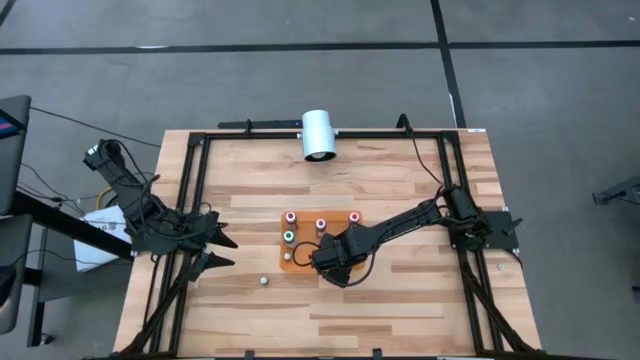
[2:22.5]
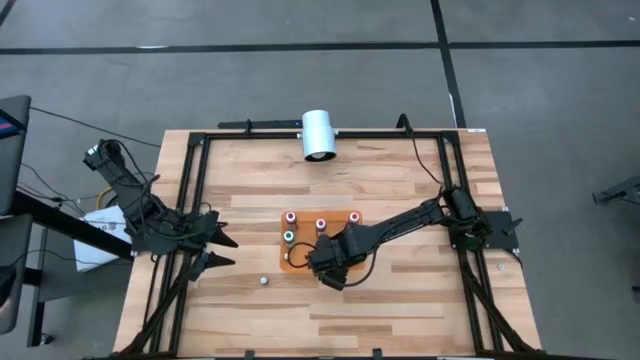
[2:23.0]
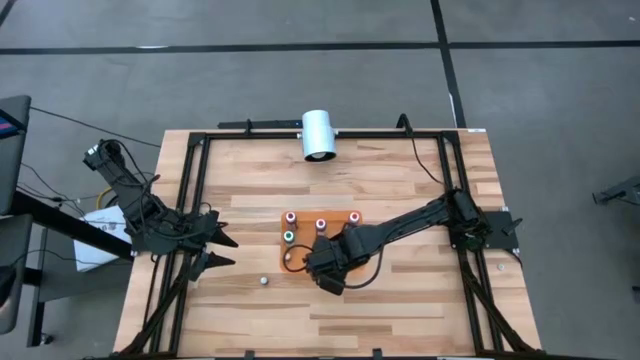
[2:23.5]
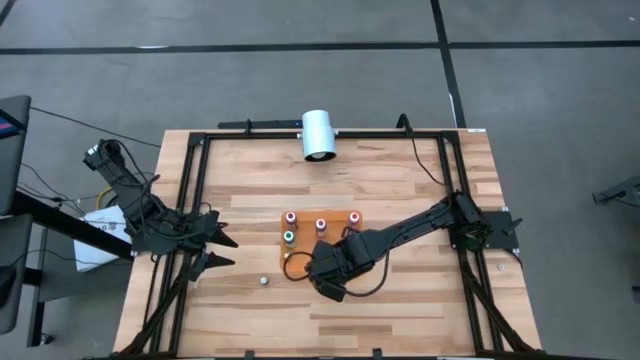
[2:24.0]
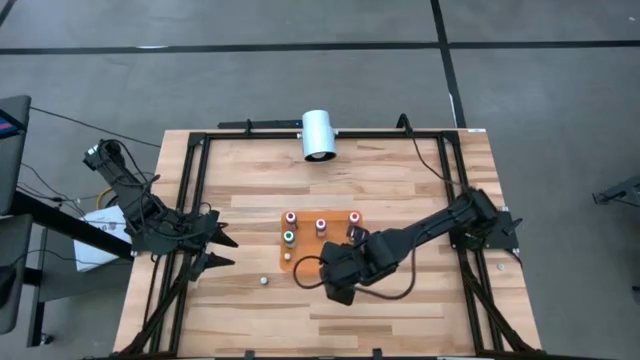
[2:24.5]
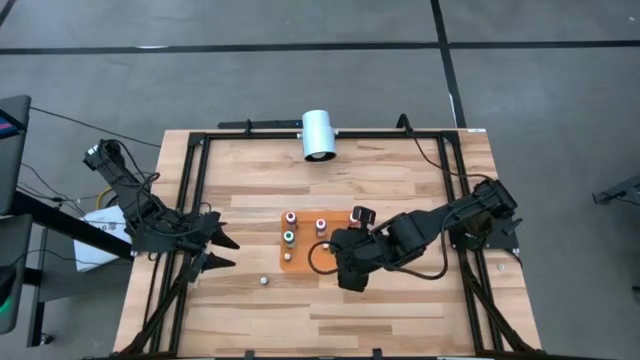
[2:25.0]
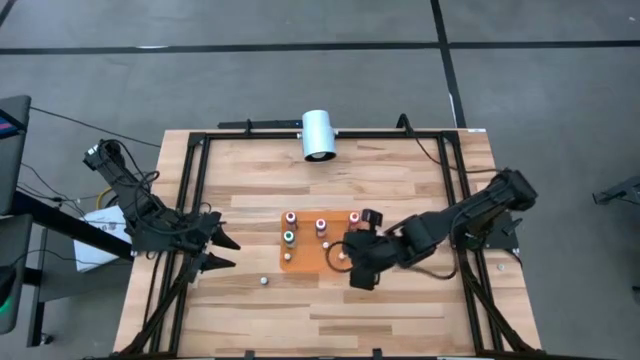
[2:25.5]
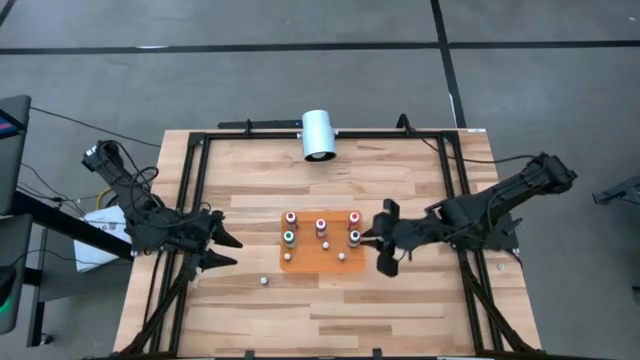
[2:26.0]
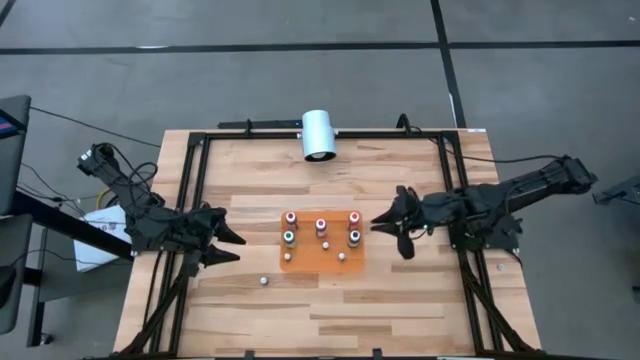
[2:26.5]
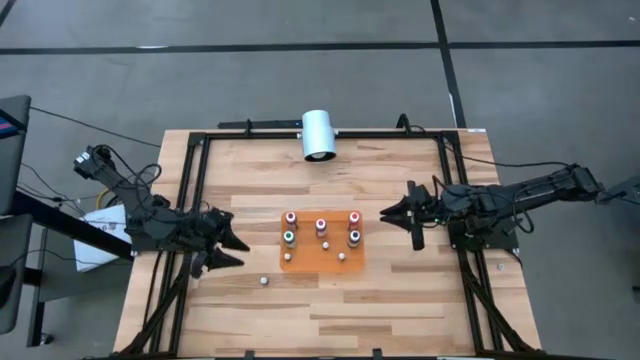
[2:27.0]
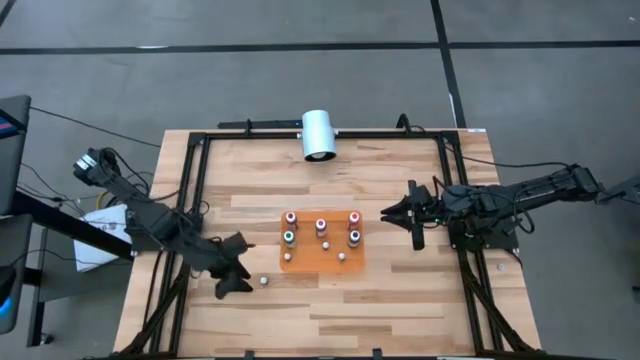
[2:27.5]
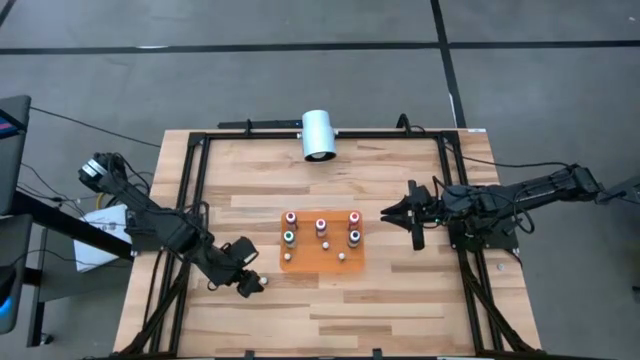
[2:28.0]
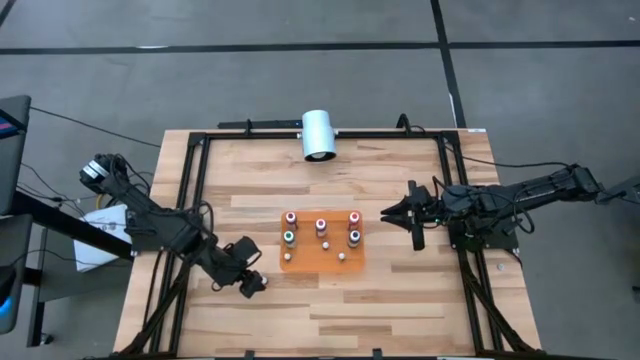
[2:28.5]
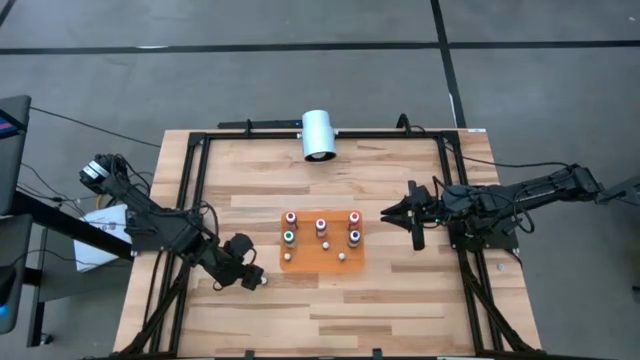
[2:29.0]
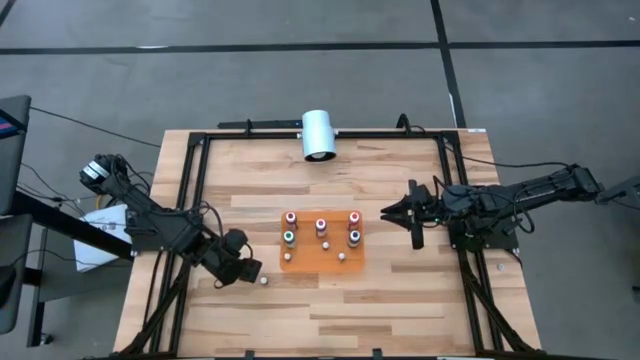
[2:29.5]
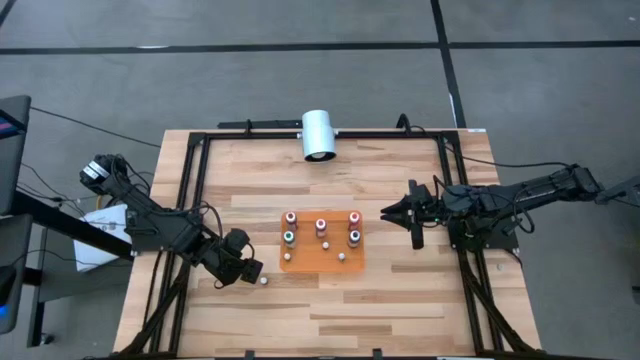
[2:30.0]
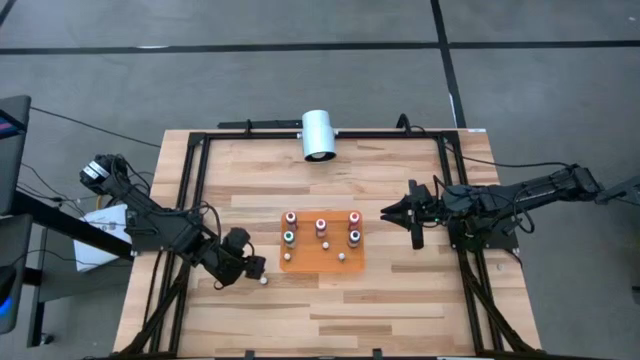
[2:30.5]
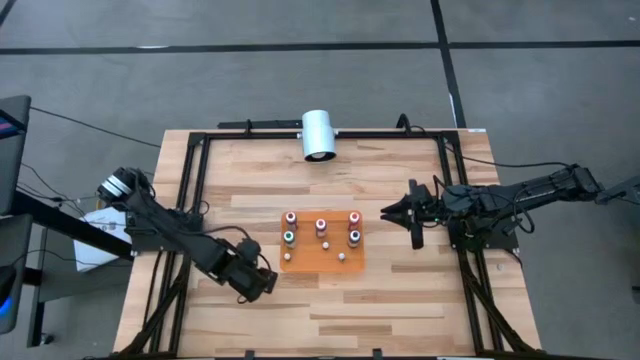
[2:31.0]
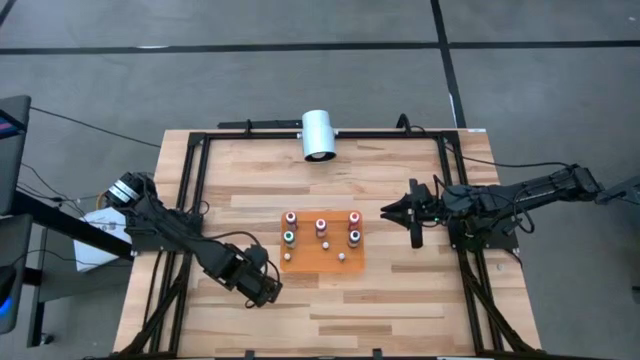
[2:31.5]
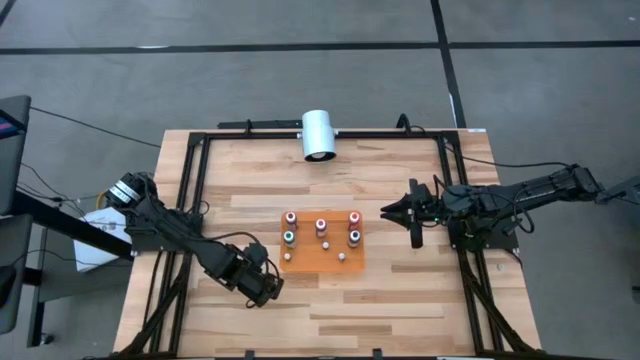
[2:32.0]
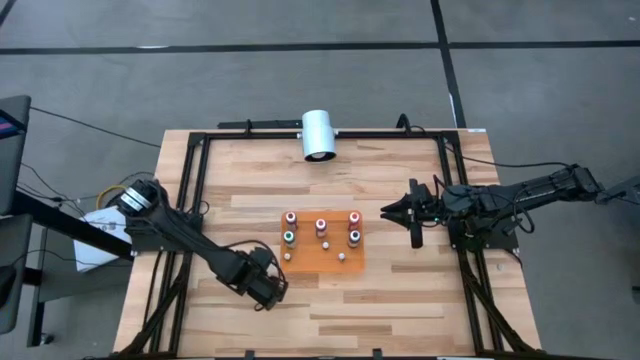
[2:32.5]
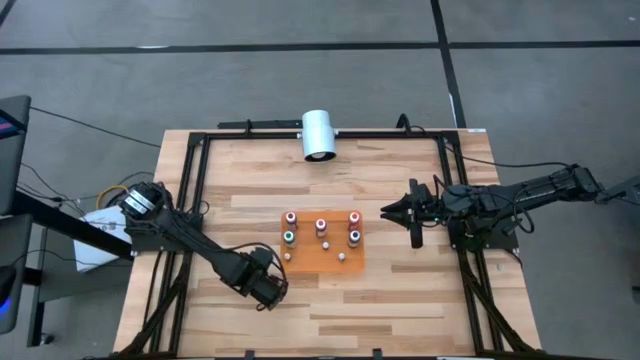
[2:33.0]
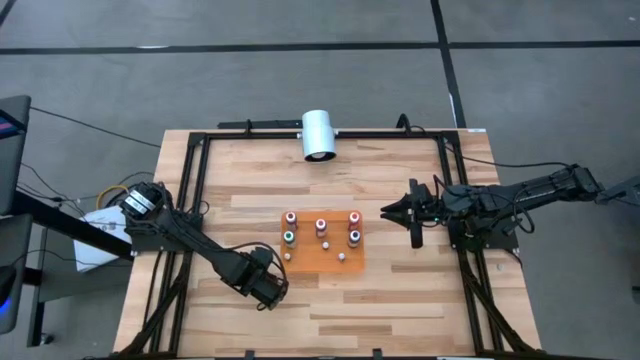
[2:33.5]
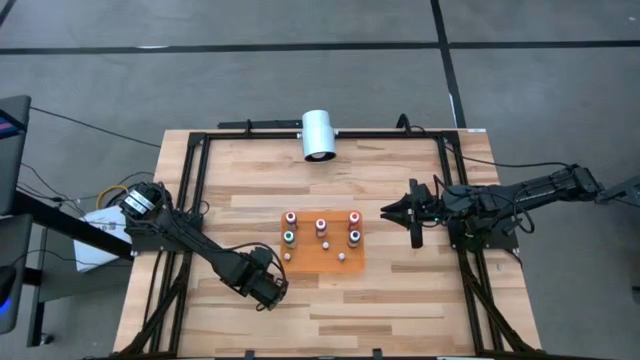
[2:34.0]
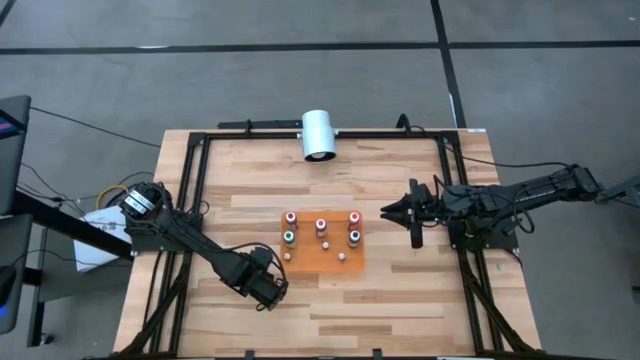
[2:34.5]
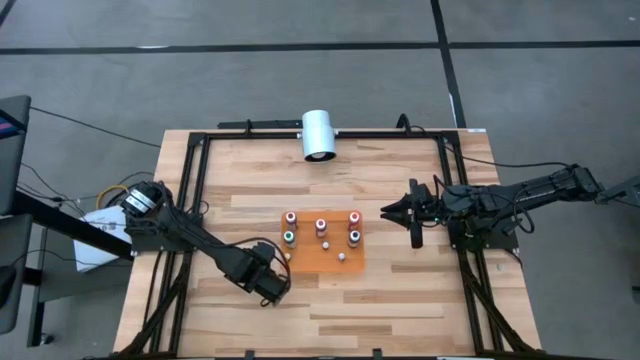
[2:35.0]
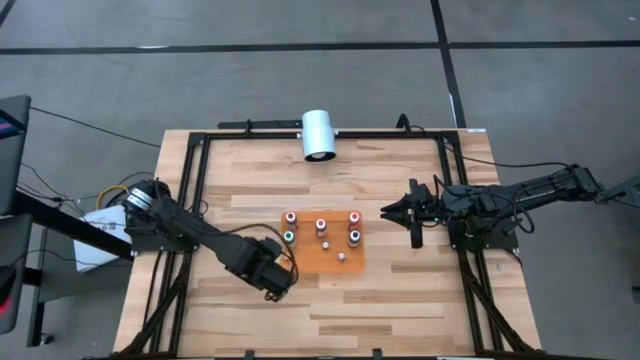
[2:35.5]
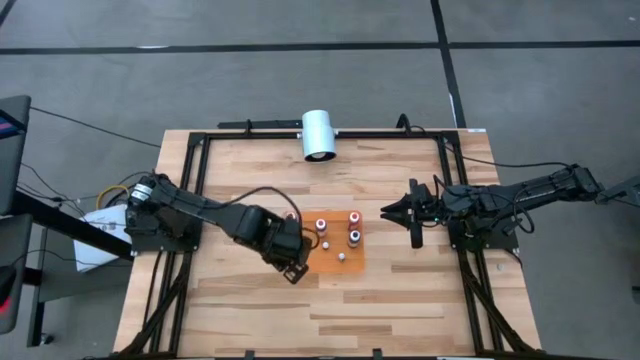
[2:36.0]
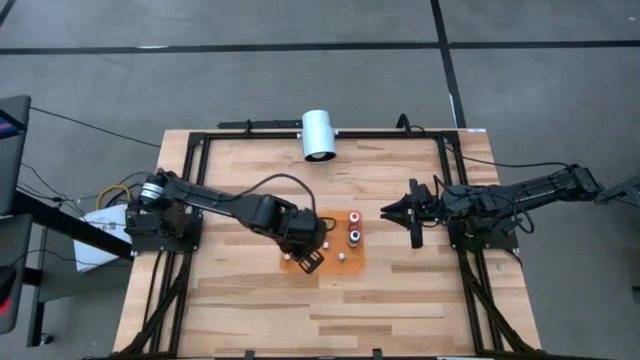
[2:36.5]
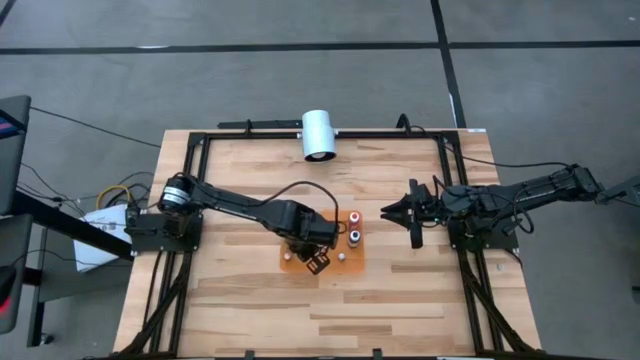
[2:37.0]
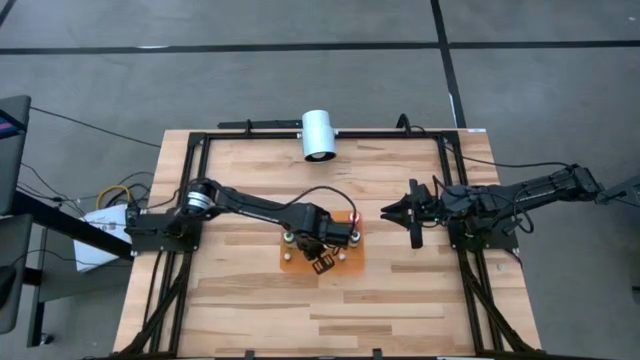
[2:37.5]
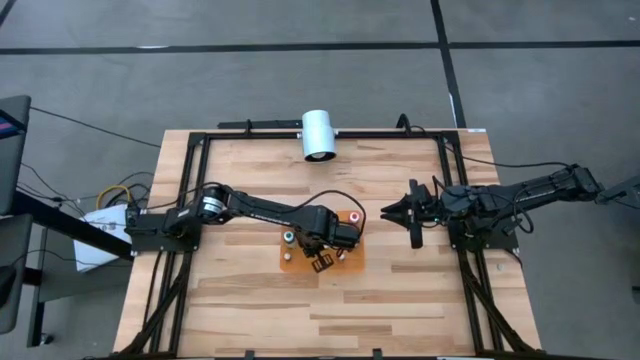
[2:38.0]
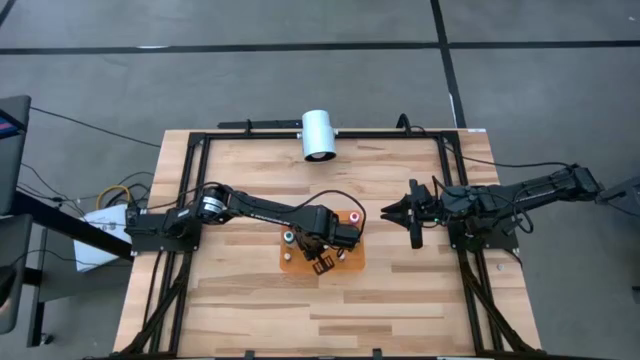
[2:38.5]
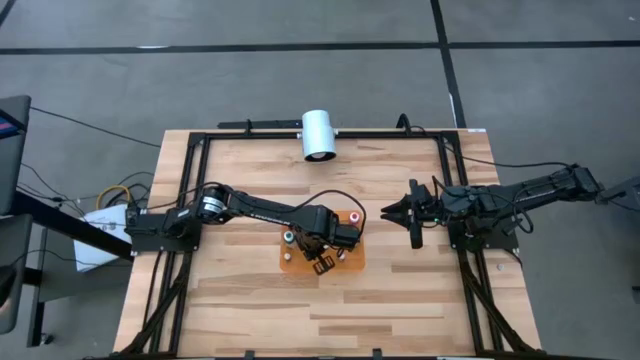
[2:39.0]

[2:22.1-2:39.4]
Task: Pick & Place food coloring
Put the small green food coloring bottle into the orange container

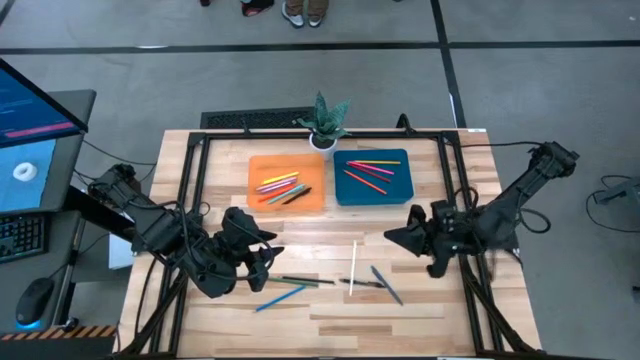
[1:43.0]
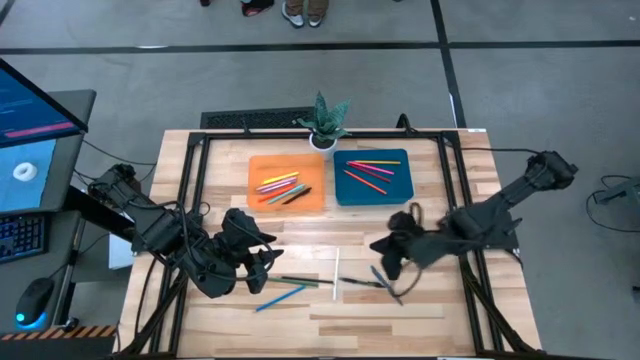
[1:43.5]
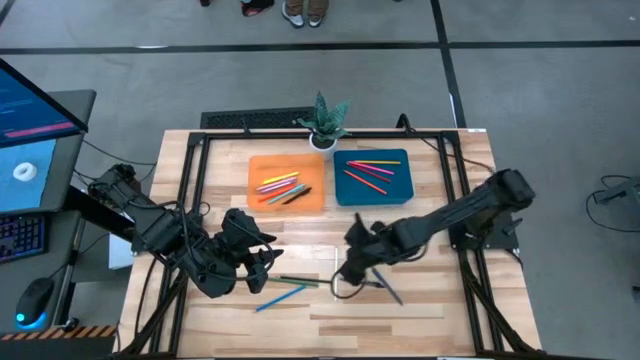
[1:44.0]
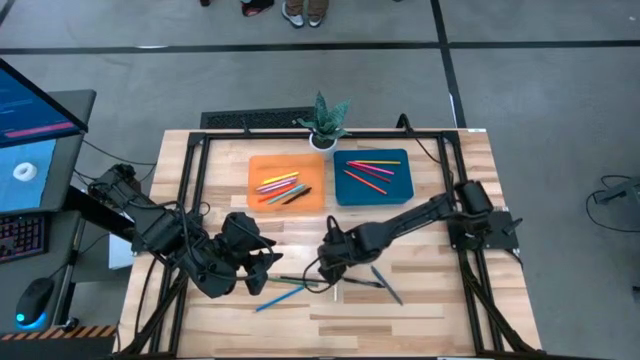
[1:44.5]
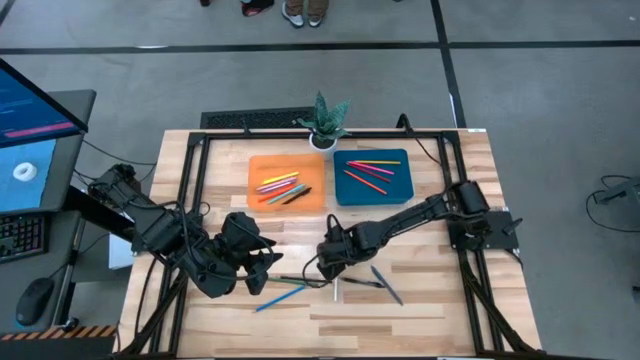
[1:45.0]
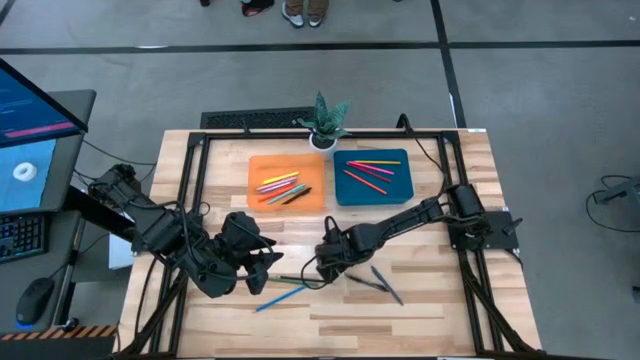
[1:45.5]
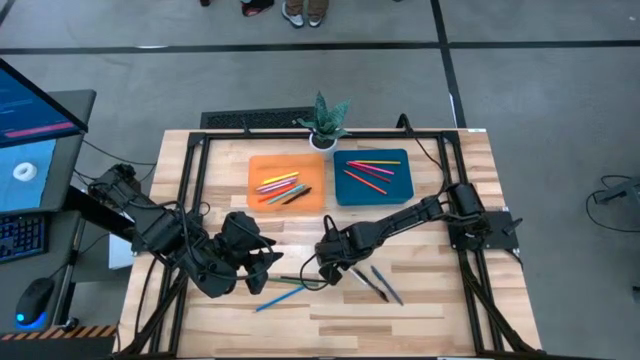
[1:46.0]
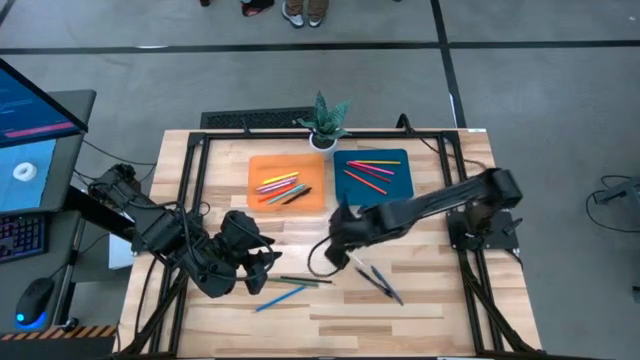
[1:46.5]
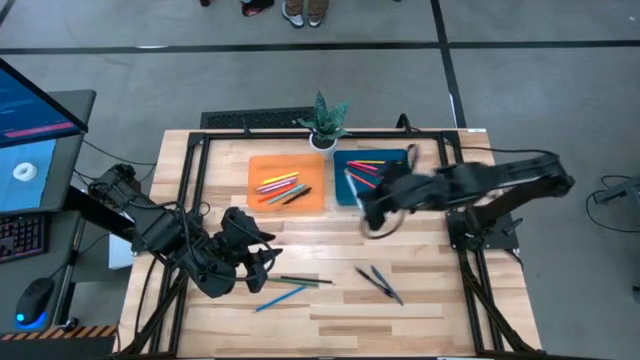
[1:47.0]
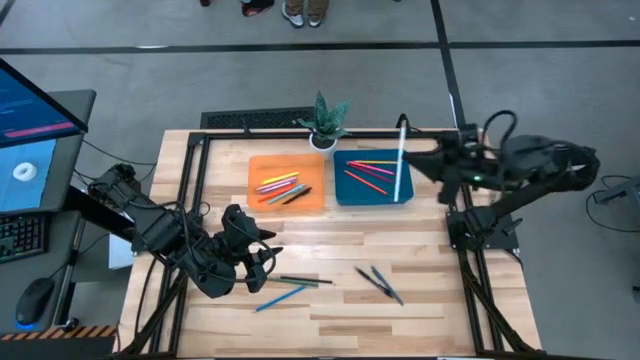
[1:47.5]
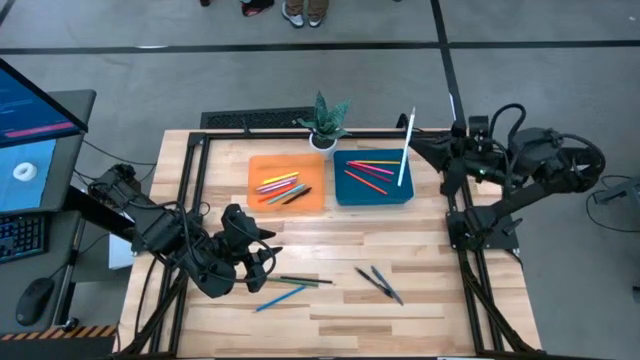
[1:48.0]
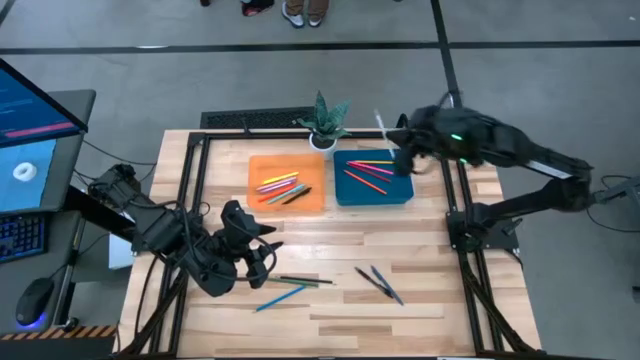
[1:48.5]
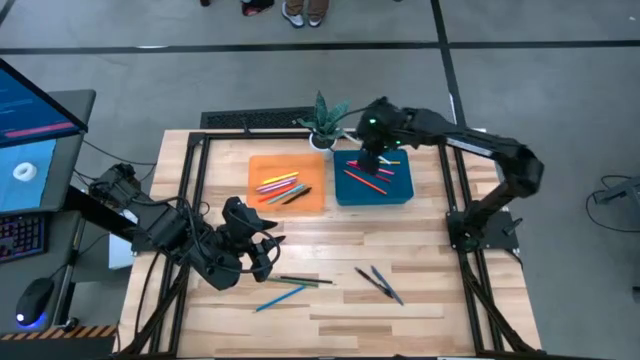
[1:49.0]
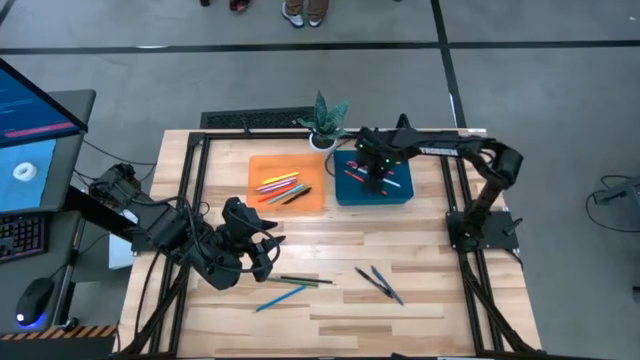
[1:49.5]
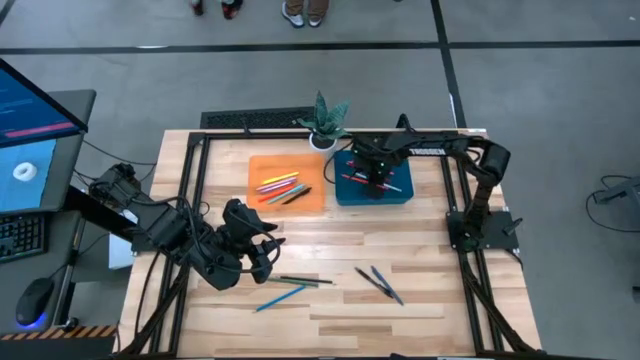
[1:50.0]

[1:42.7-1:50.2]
Task: Sort pens & pencils
Put the white pencil into the blue bin
